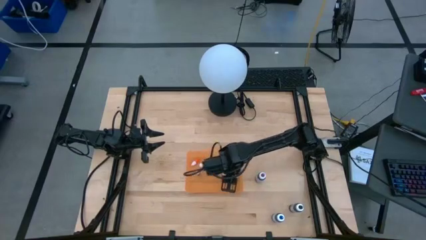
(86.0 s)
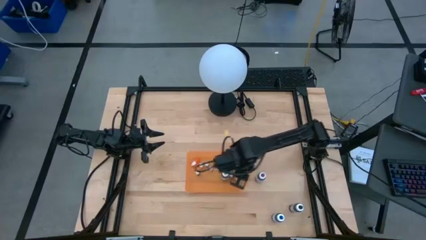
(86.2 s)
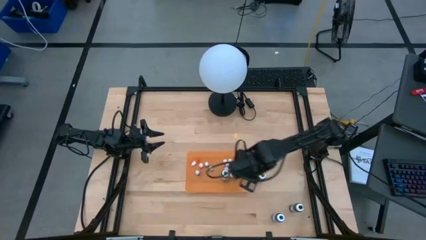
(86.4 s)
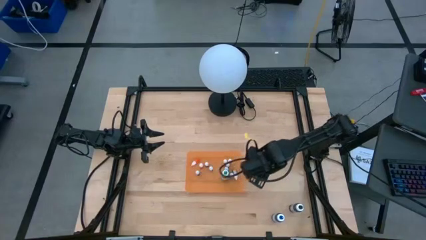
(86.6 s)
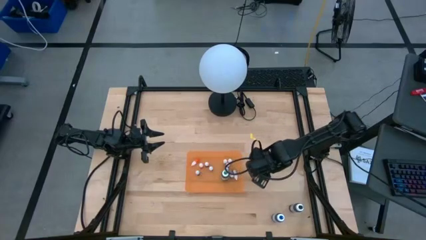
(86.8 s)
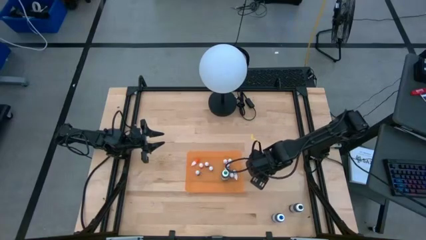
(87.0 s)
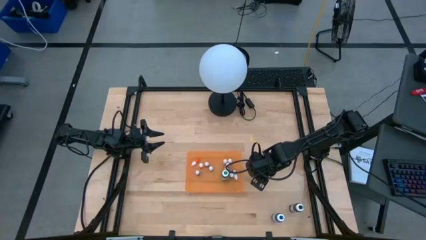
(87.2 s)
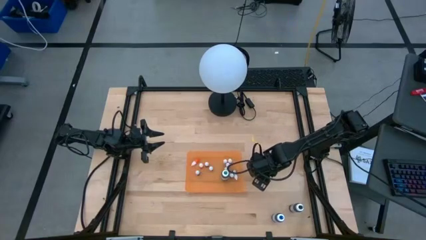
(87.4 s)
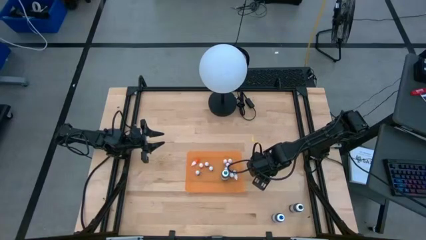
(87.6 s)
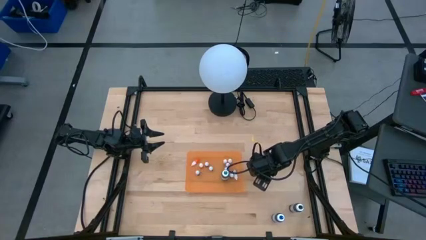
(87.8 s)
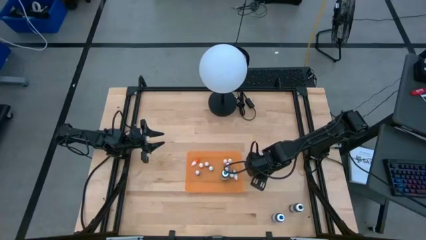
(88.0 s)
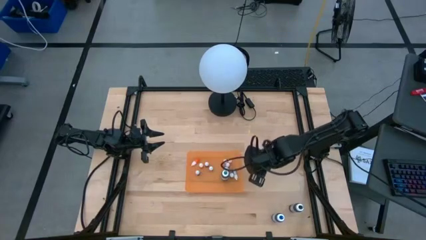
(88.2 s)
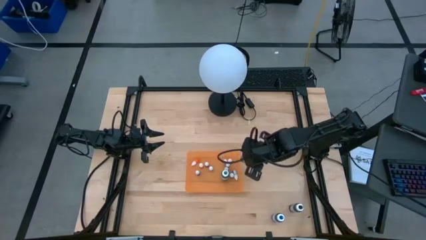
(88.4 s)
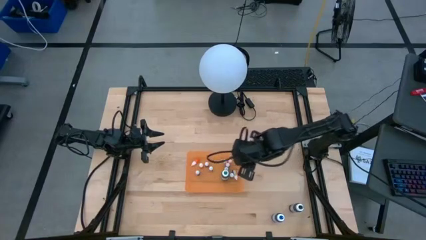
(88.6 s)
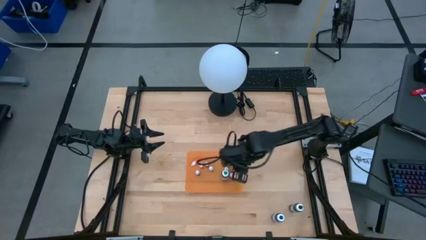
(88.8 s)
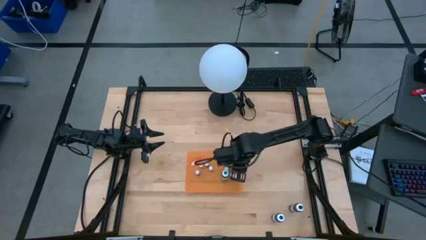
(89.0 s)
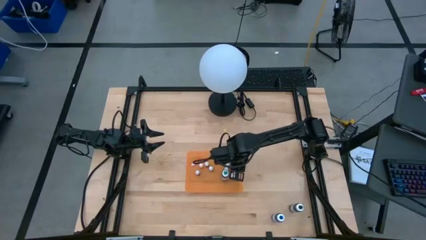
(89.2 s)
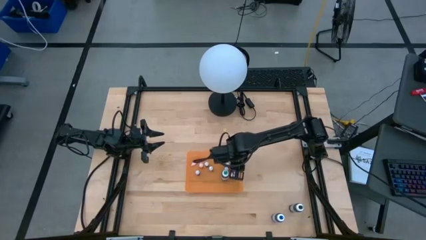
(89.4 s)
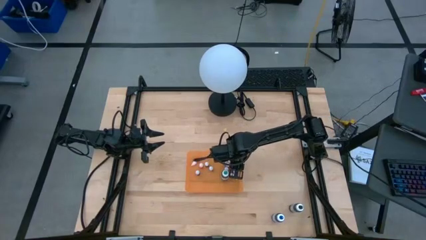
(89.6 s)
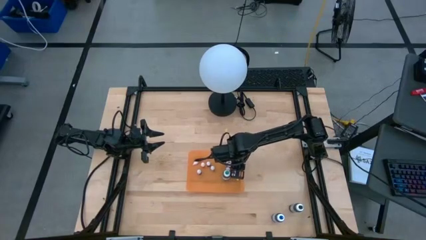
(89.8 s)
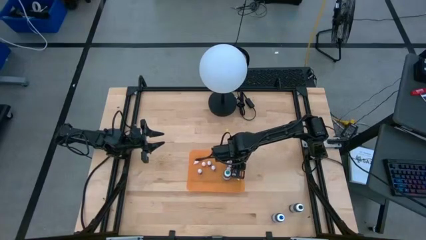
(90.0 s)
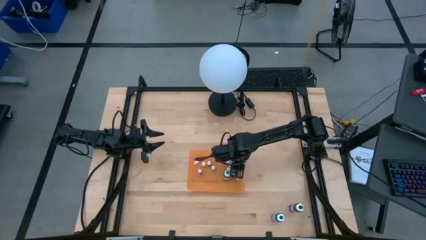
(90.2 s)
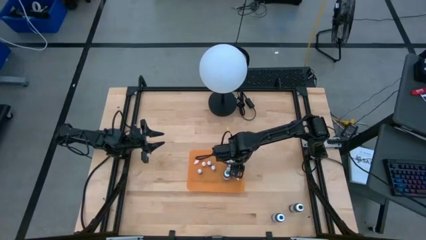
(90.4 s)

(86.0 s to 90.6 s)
Task: Pick & Place food coloring
Put the large purple food coloring bottle into the orange container

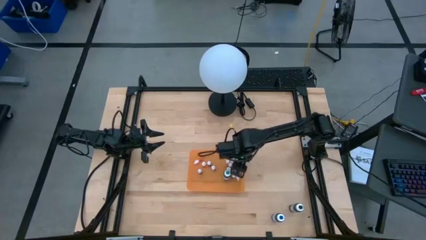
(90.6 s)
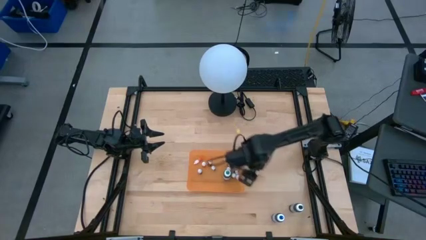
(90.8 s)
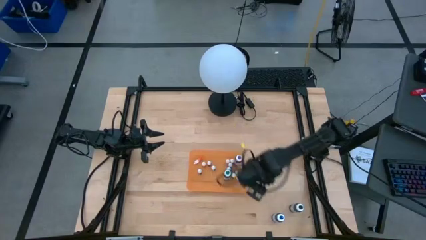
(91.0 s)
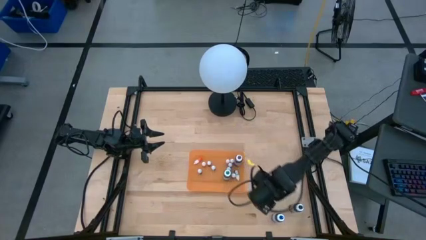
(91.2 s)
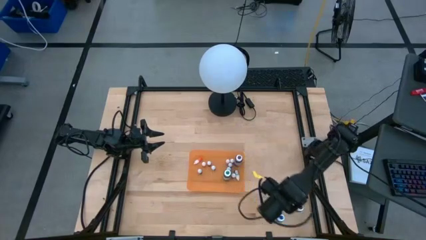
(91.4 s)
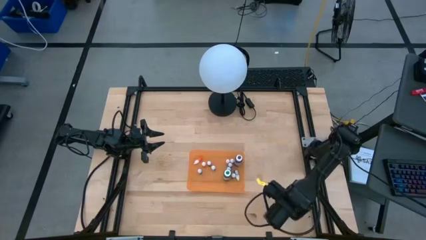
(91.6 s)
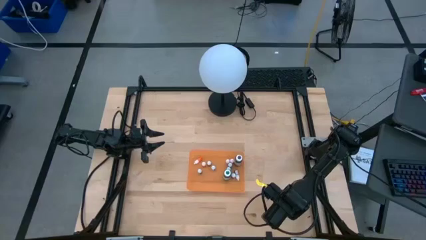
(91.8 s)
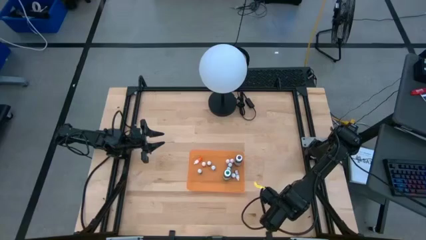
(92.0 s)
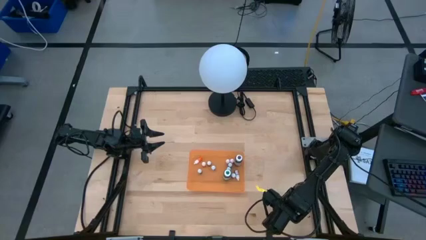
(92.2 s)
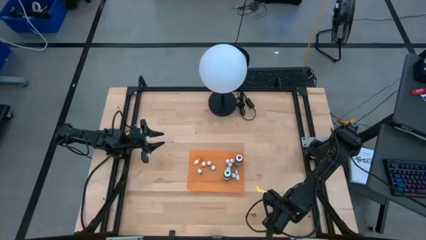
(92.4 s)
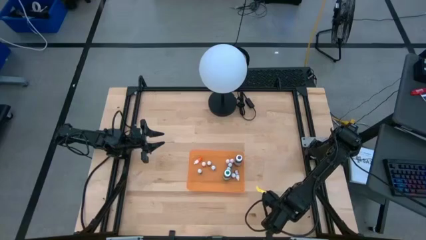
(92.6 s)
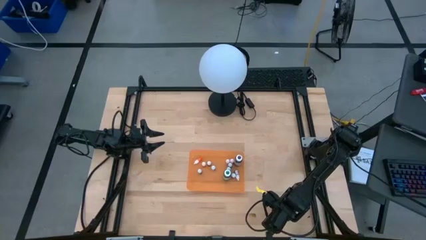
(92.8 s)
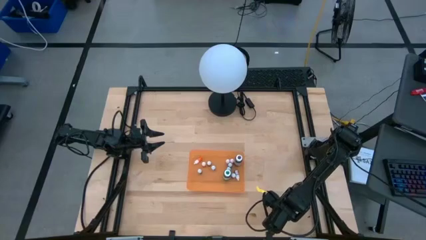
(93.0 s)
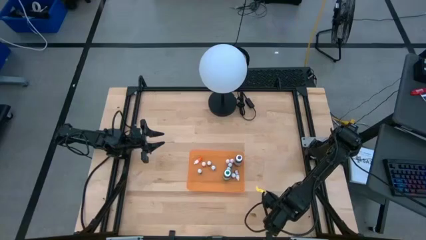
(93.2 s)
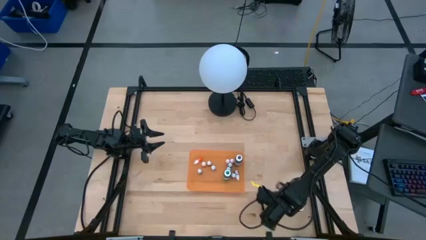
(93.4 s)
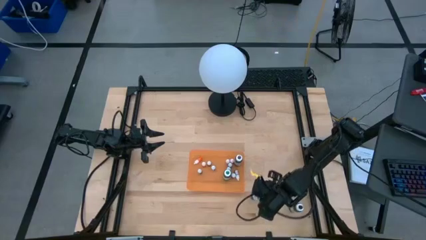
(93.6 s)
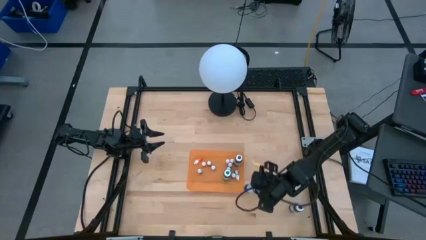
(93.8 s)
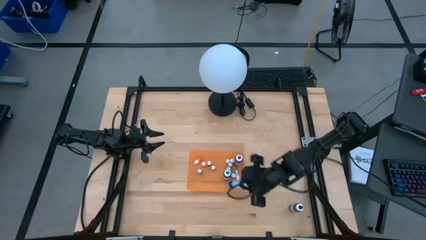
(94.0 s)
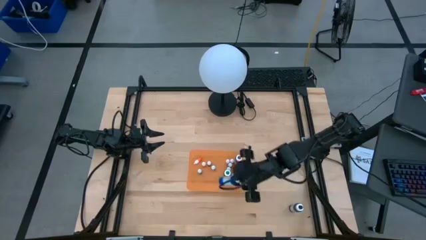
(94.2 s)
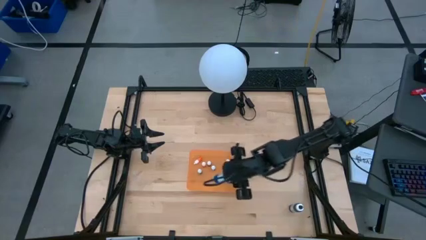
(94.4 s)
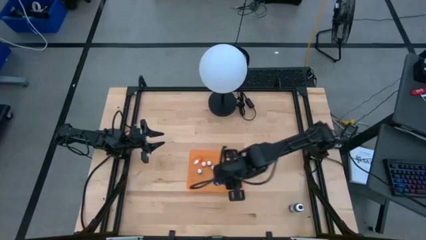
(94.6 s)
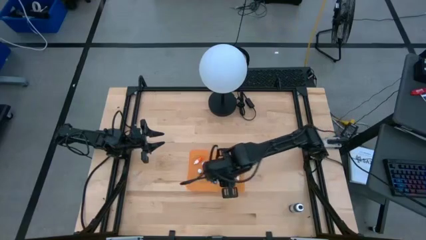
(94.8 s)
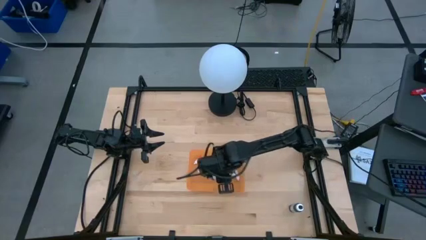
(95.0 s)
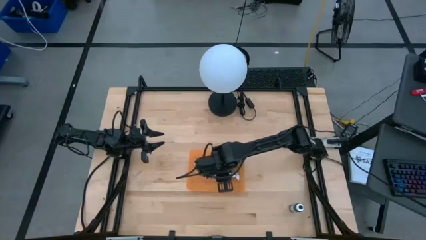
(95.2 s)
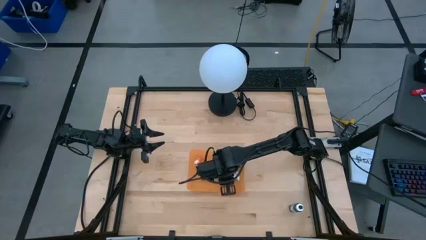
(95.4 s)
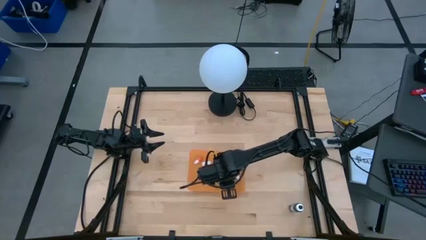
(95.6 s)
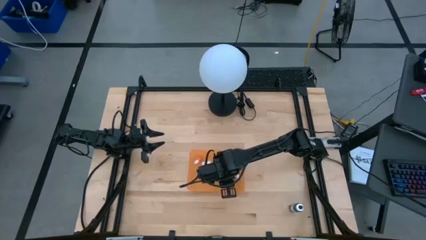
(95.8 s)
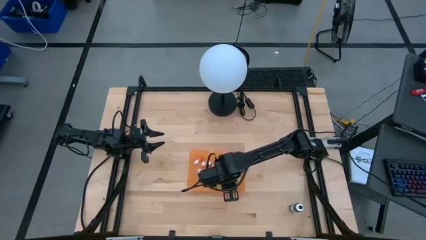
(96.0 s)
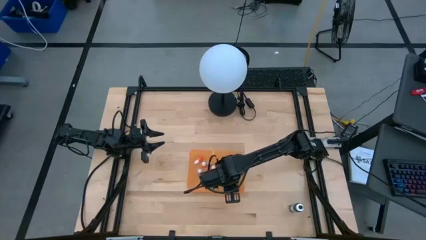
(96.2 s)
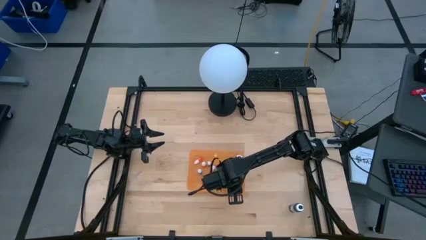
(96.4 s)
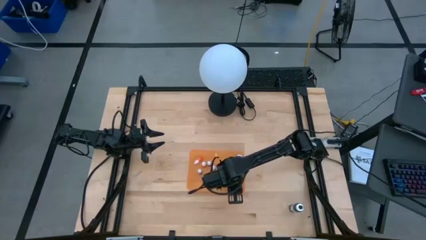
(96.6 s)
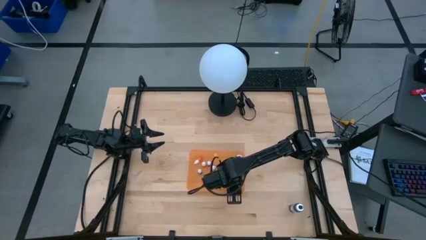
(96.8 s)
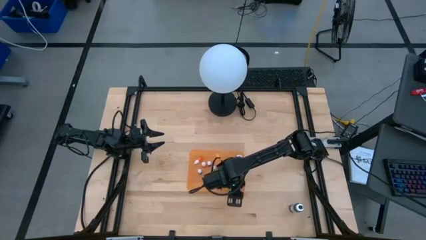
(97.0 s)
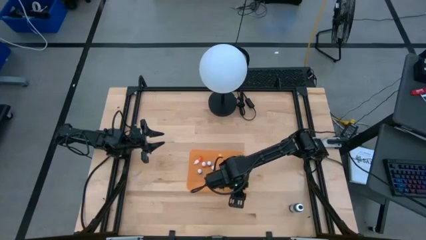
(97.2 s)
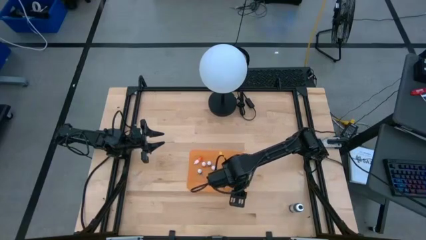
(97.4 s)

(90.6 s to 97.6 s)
Put the large blue food coloring bottle into the orange container

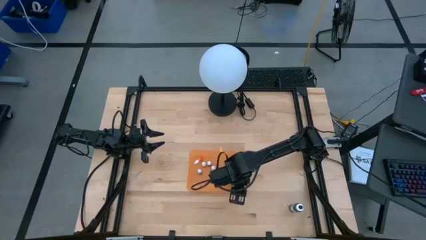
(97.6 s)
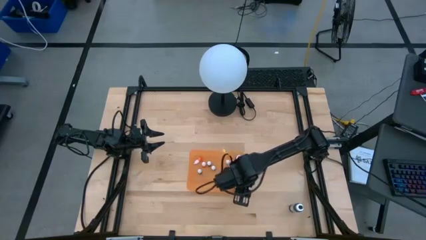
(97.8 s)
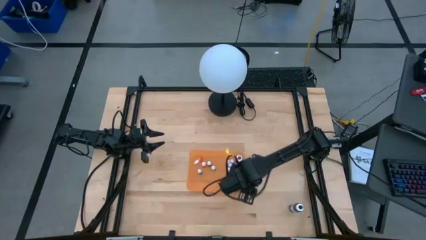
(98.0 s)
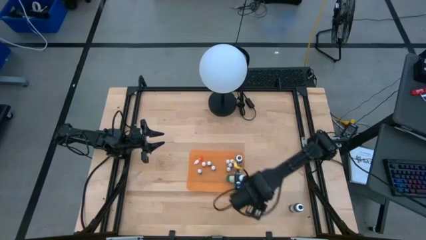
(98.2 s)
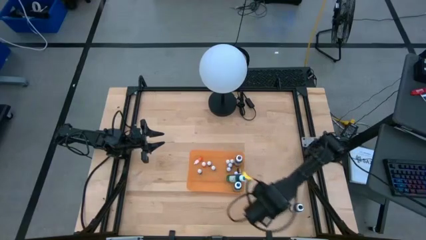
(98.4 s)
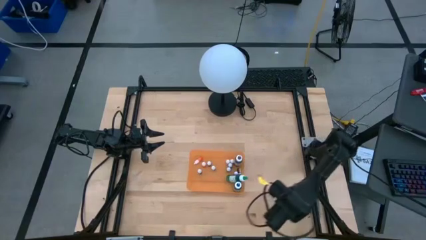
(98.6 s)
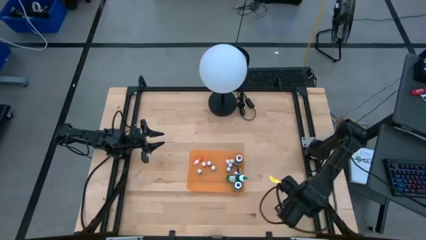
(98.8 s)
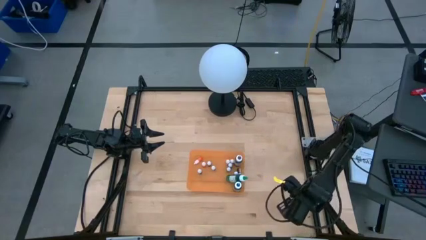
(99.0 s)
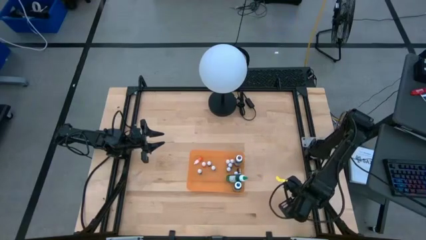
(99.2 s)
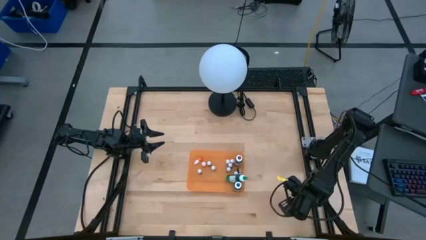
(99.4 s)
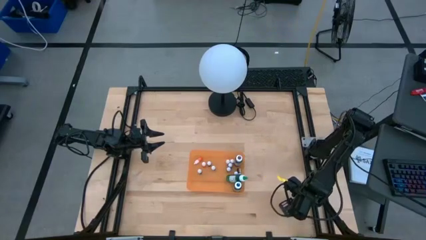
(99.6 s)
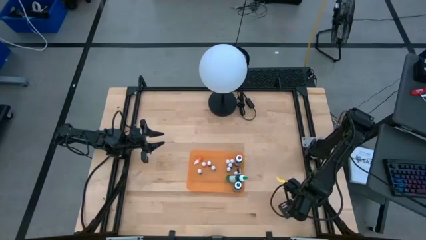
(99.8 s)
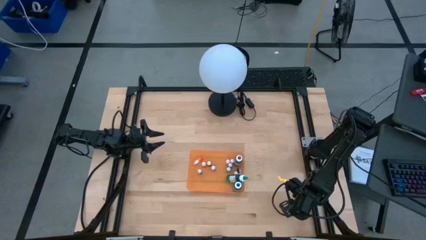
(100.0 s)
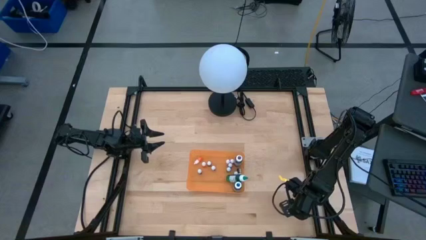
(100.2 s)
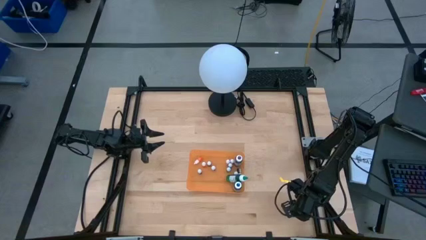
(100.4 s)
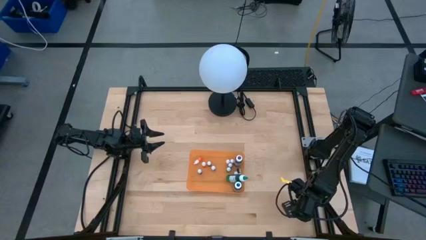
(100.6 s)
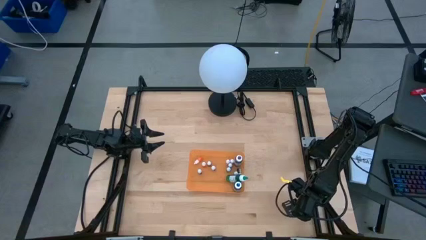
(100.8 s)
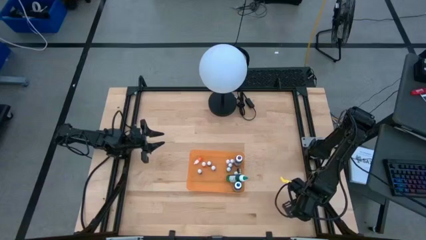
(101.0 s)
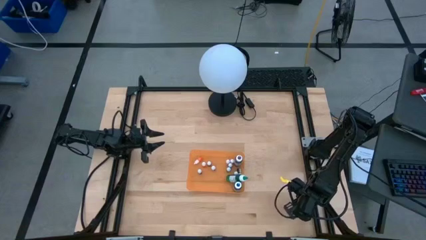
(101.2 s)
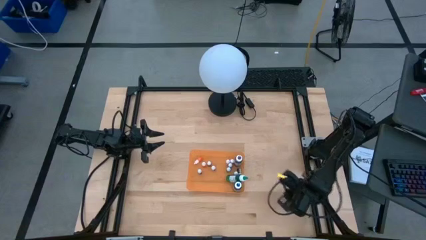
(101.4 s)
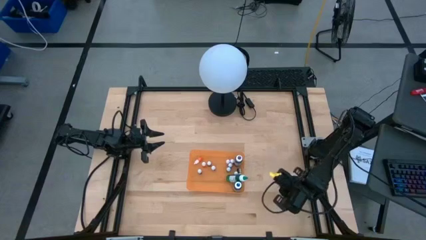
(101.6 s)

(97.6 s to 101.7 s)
Put the large black food coloring bottle into the orange container
